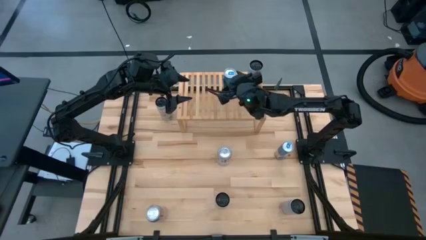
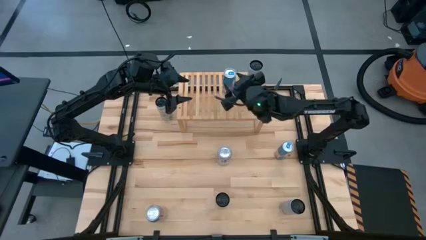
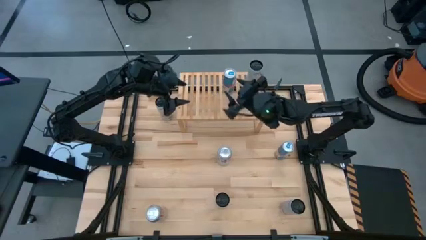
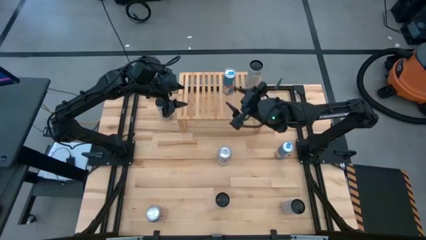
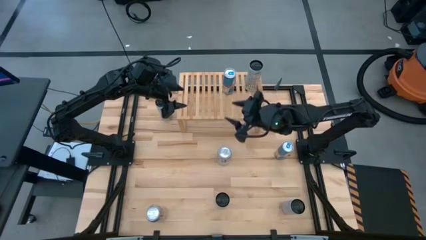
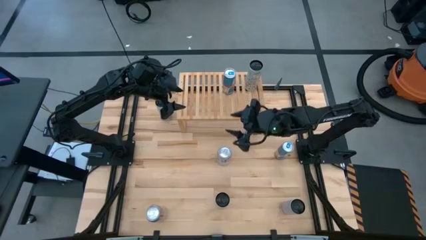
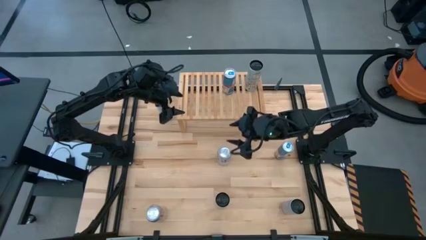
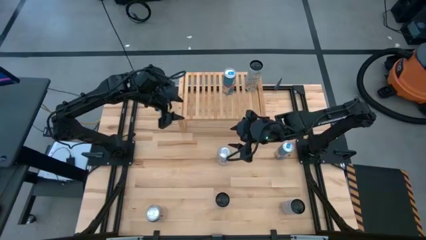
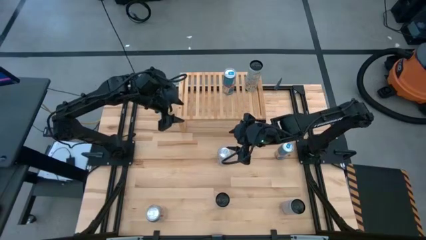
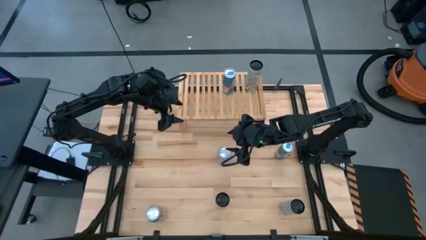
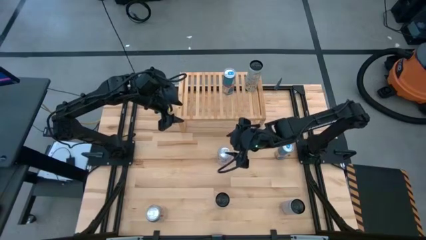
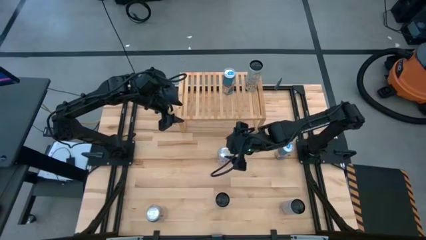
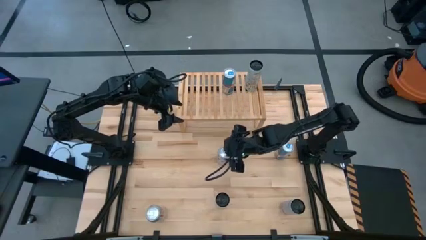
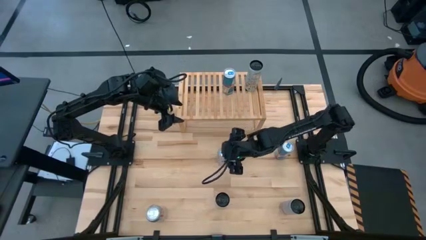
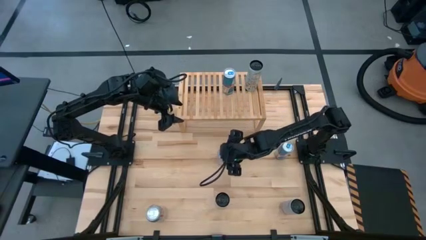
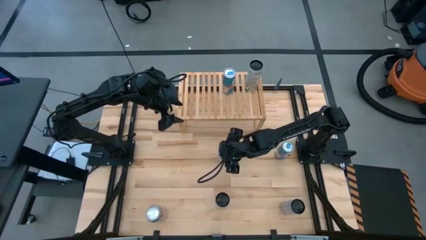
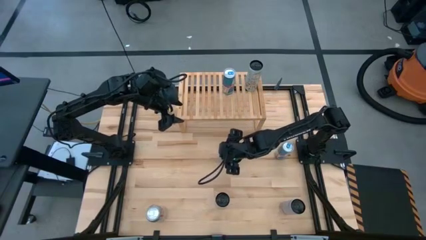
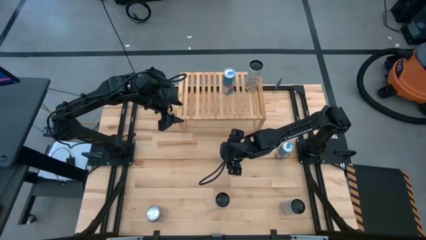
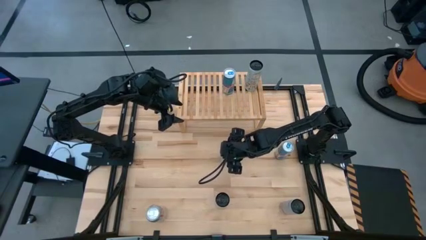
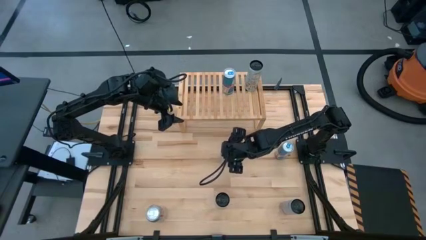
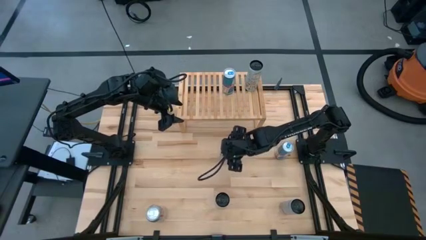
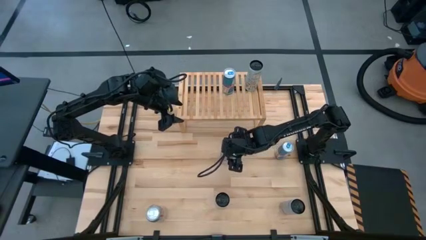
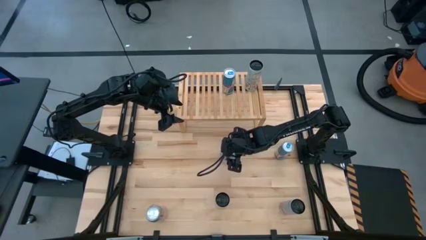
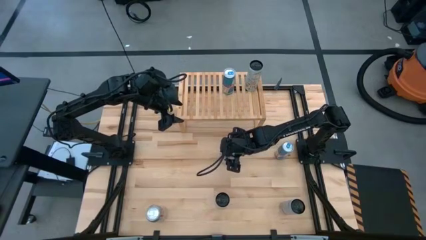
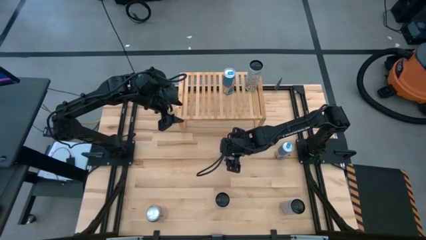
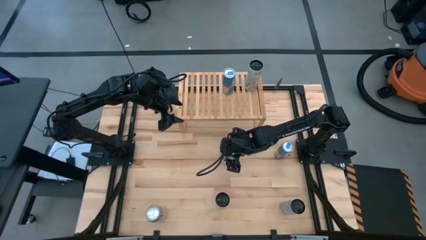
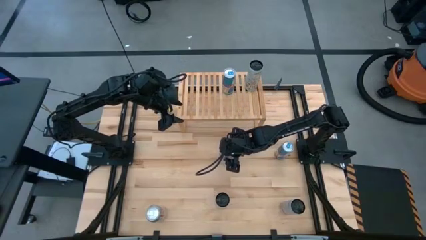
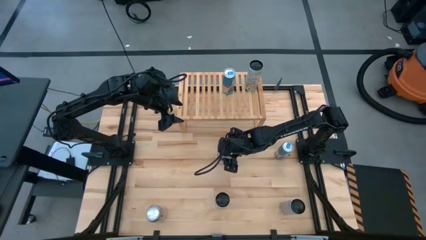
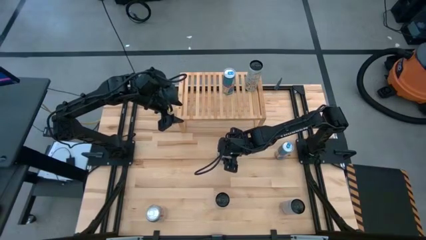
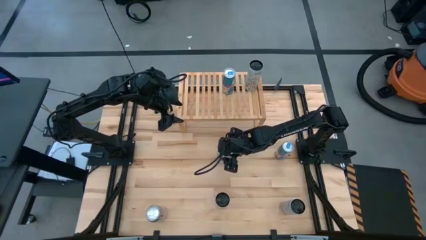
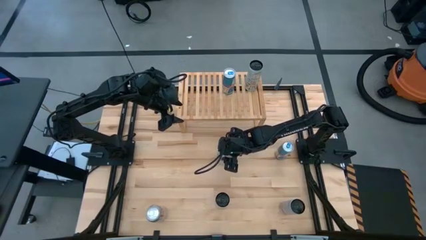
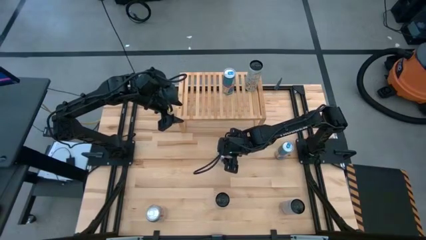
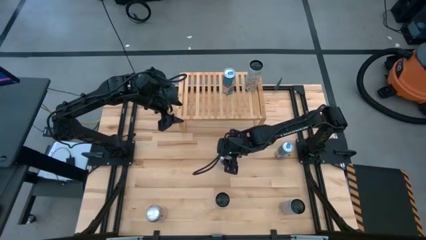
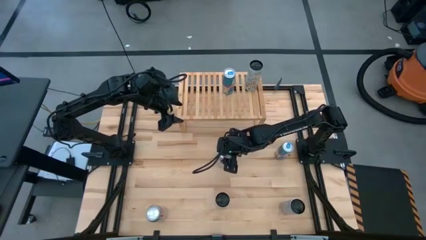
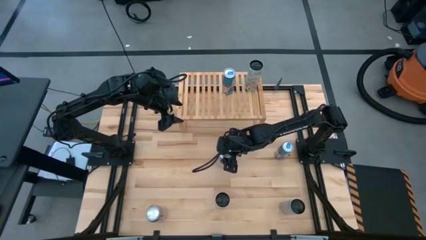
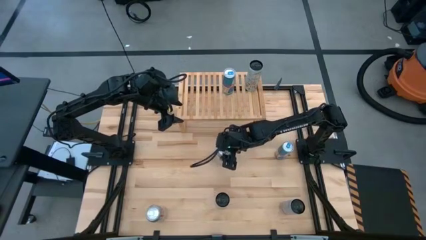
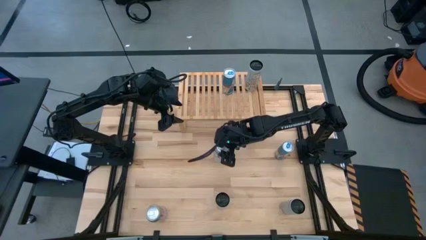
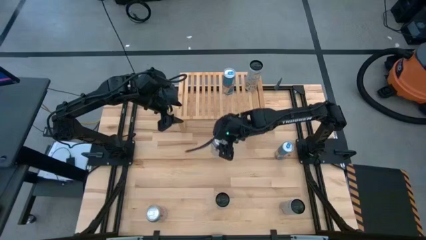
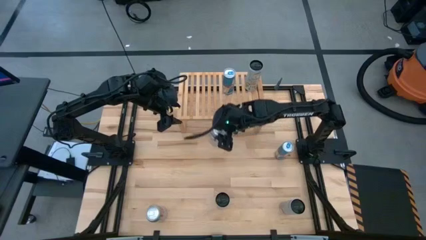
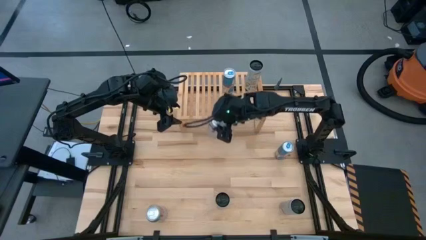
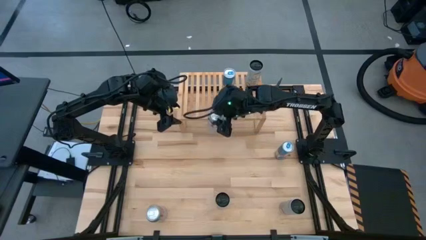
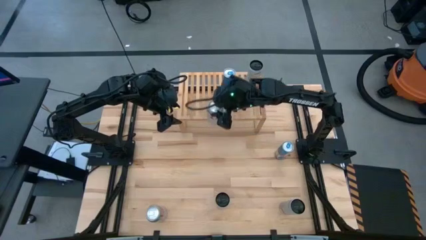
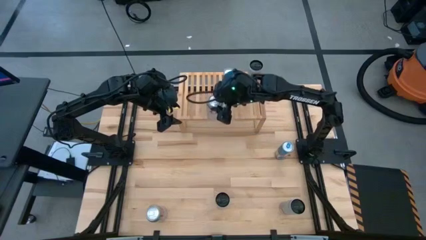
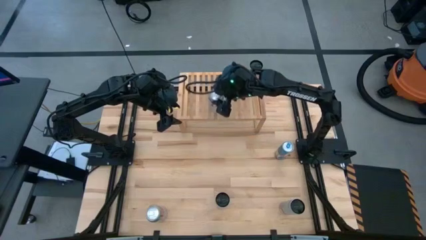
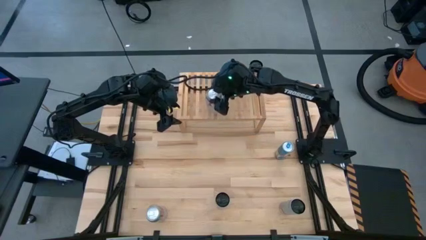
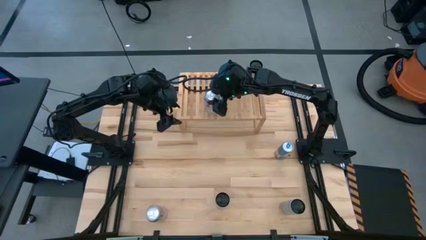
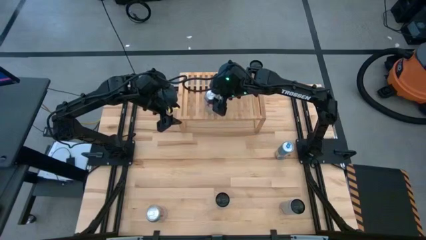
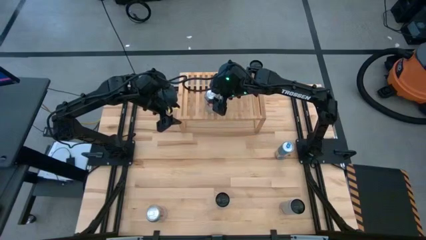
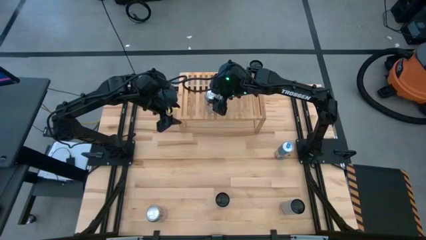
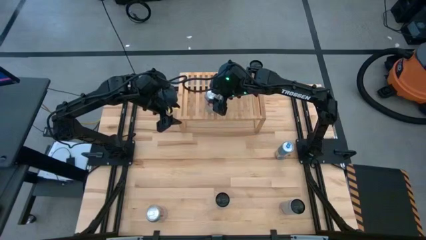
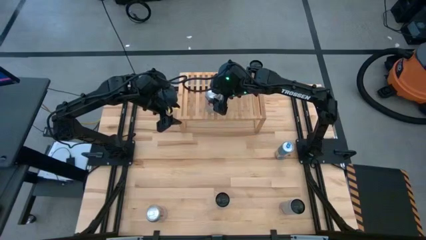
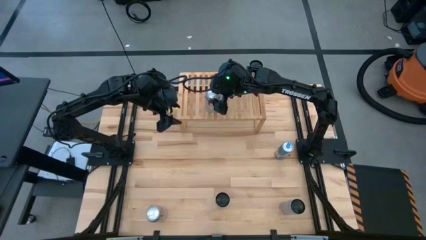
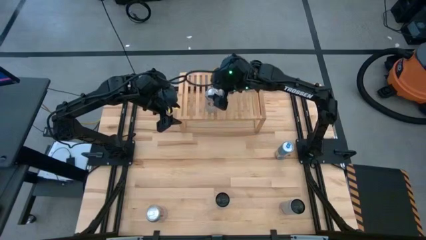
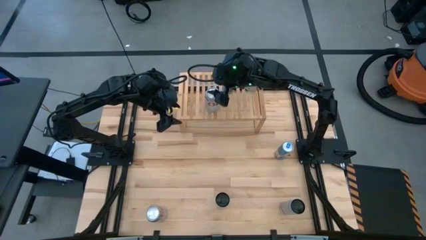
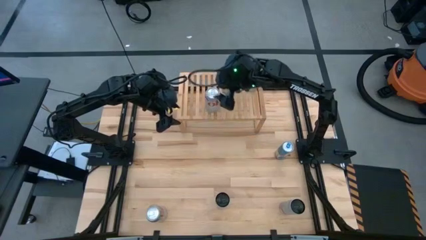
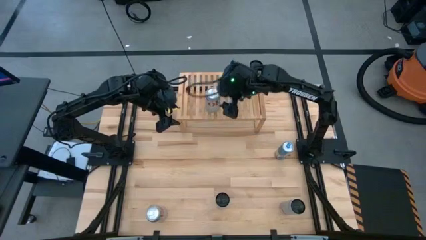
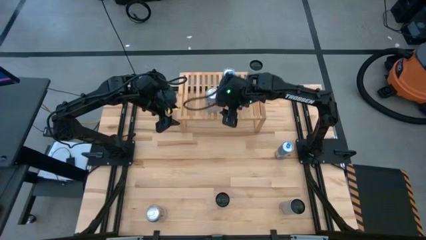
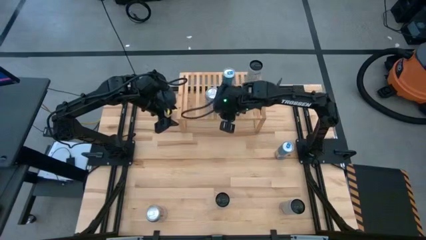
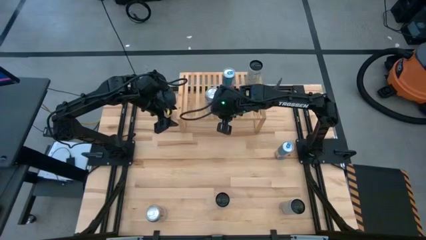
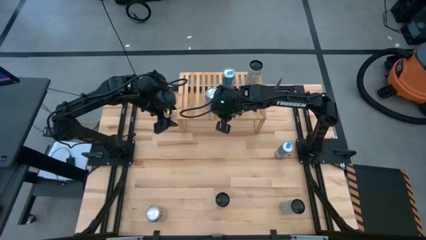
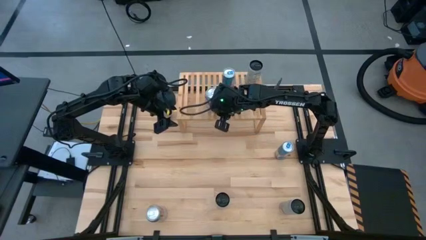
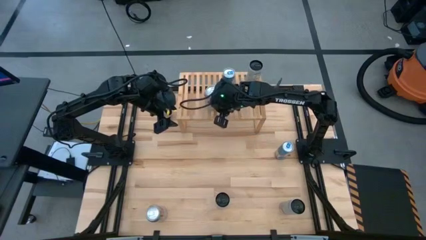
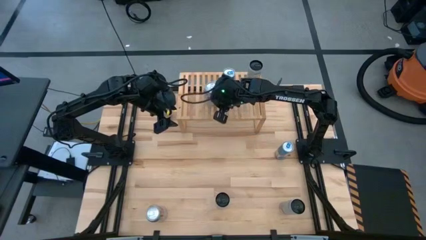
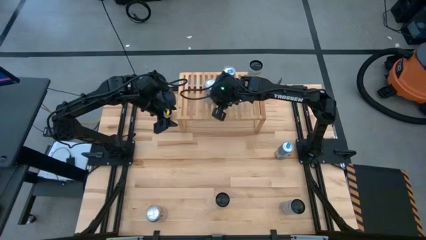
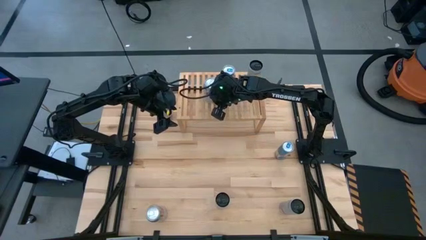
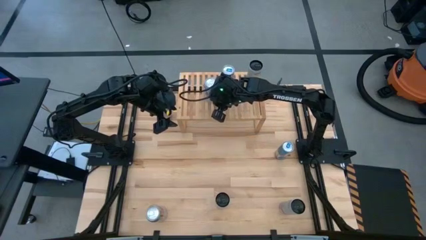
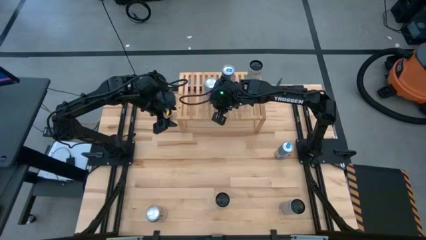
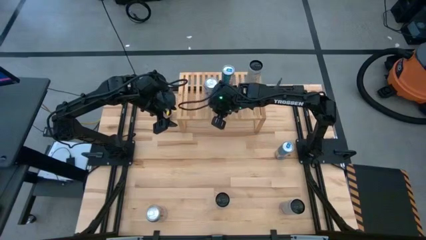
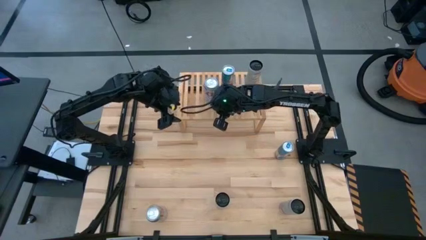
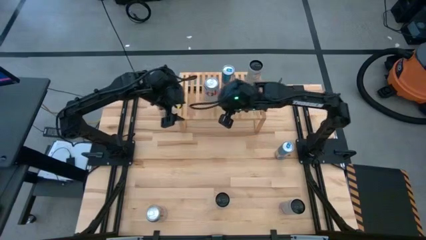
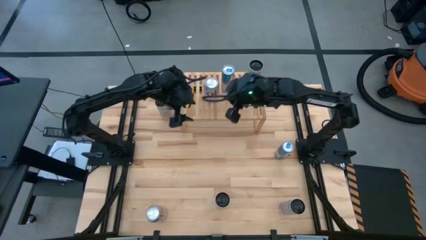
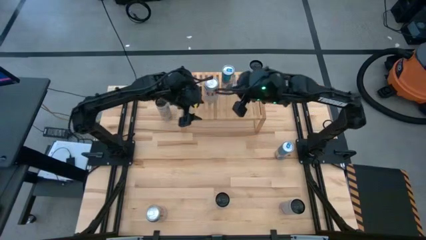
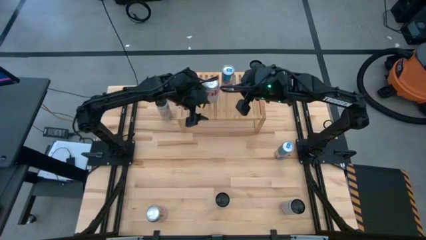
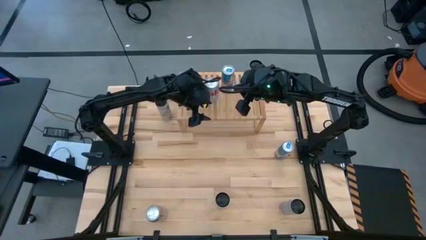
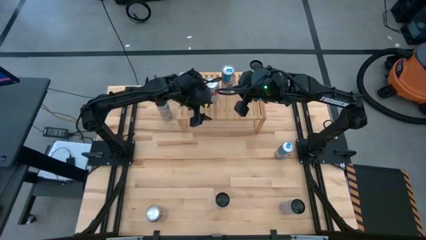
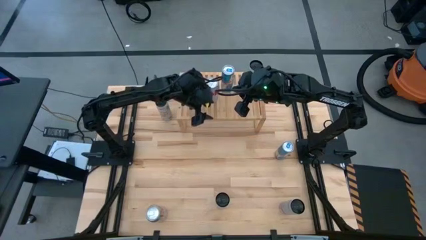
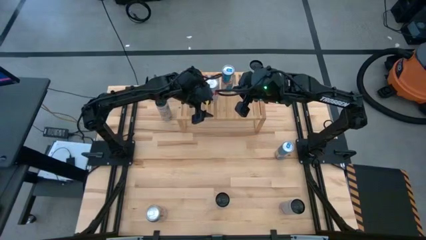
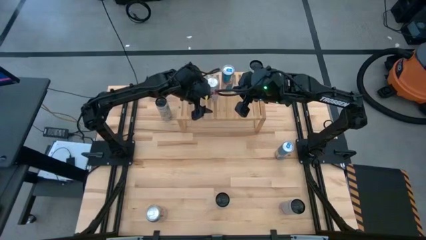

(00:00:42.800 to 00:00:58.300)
Task: Place canned beverage on shelf
Put the right silver soda can on the shelf
